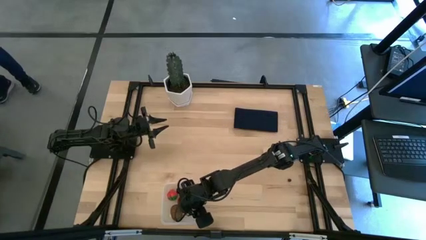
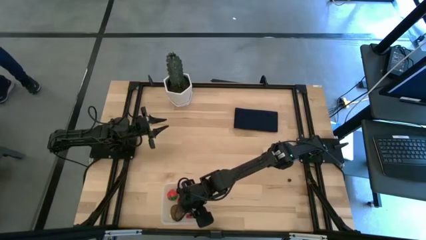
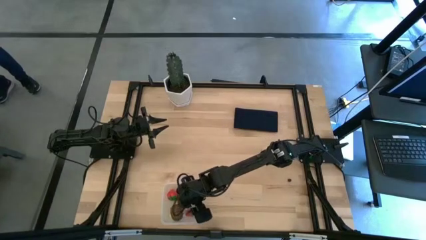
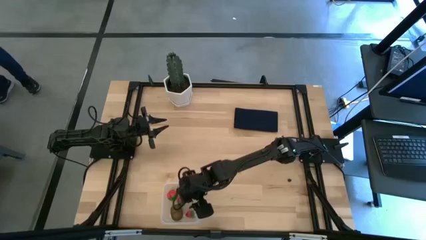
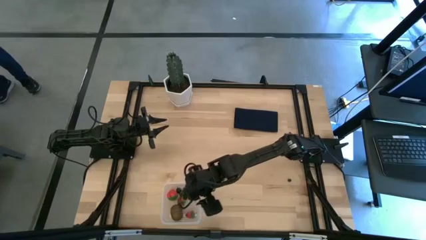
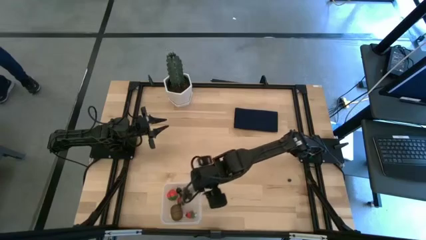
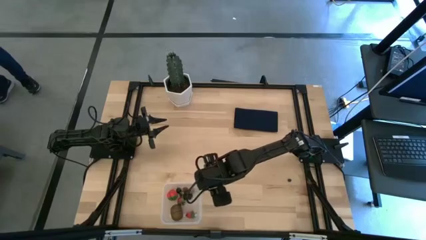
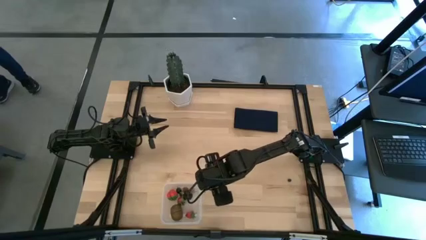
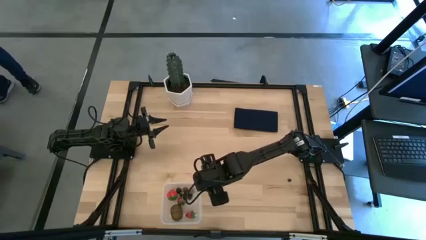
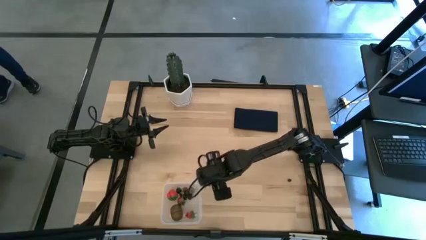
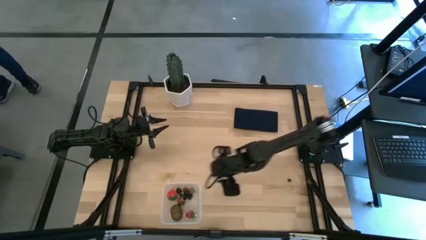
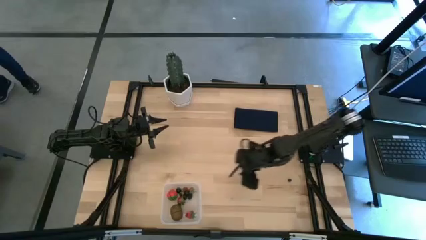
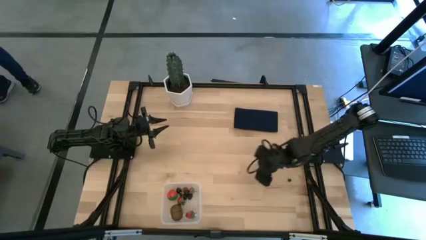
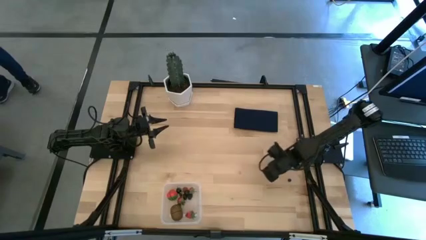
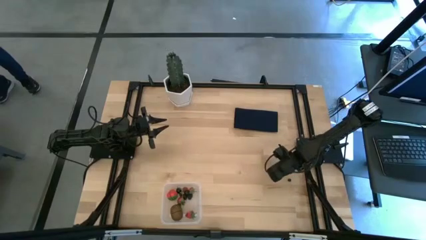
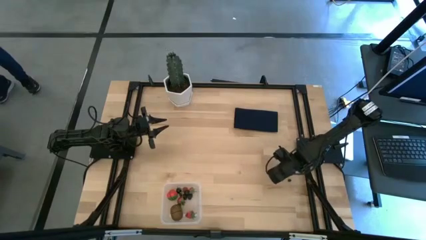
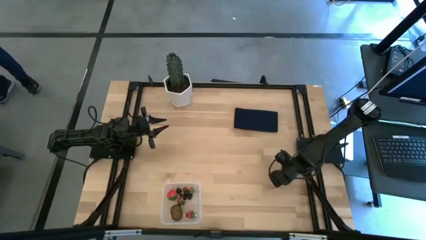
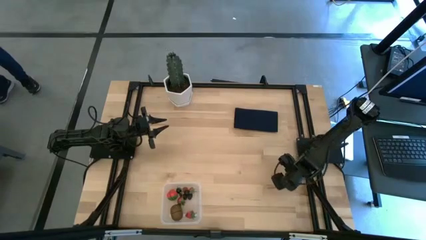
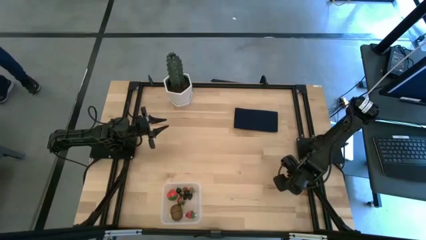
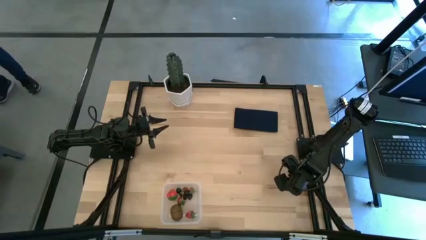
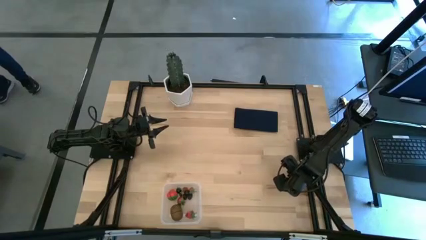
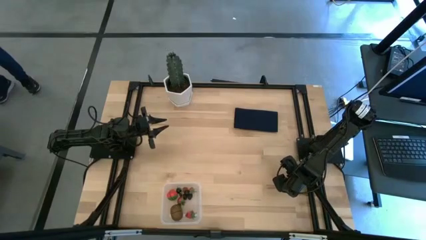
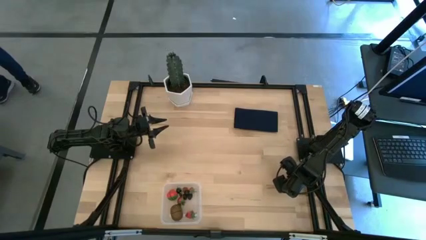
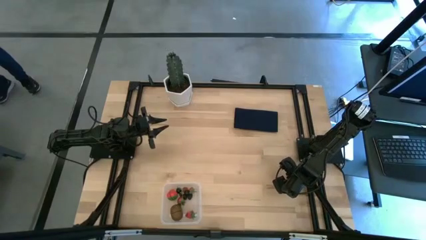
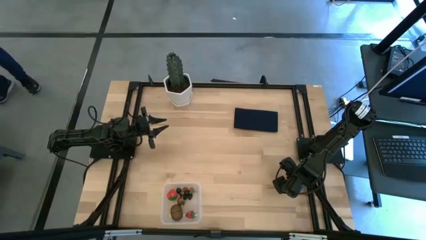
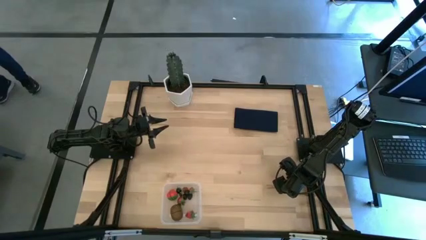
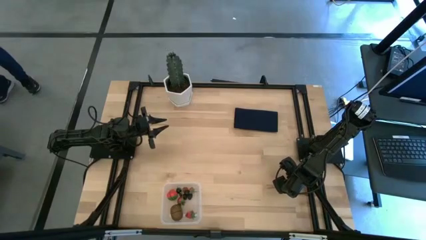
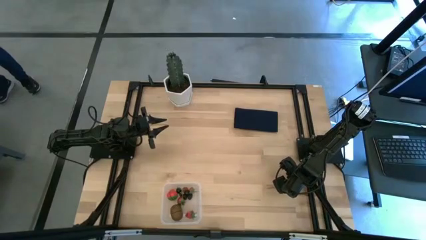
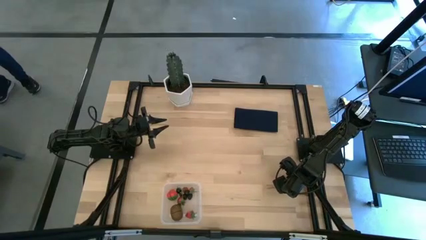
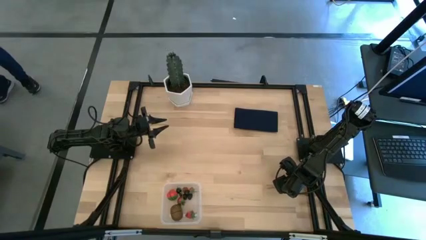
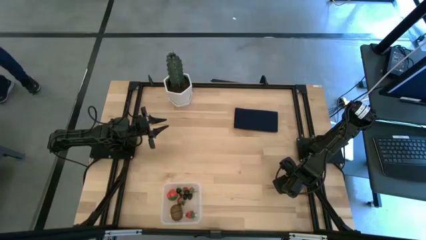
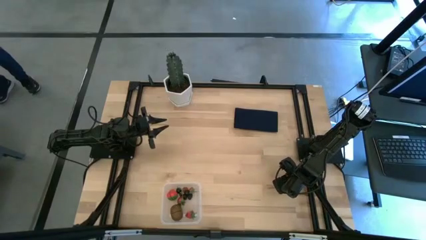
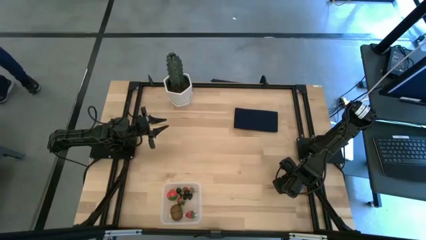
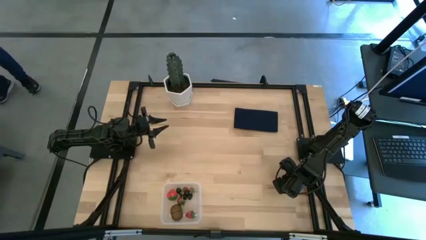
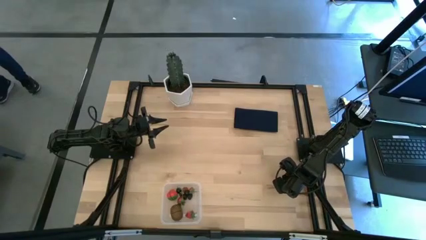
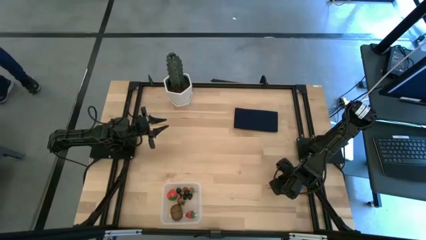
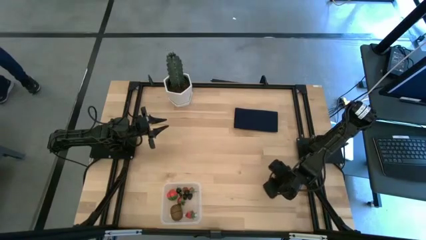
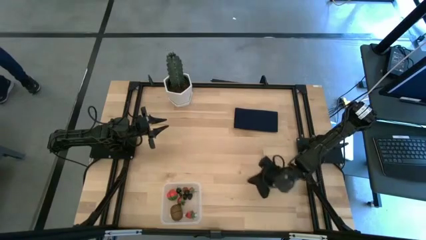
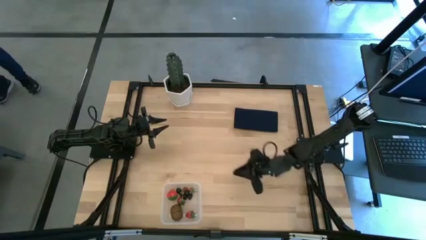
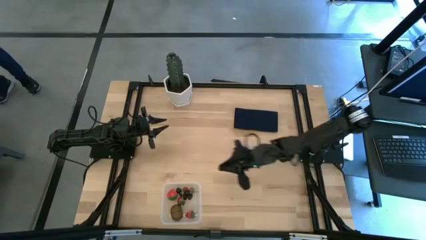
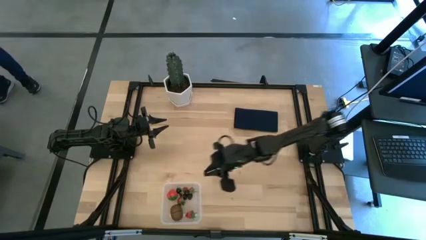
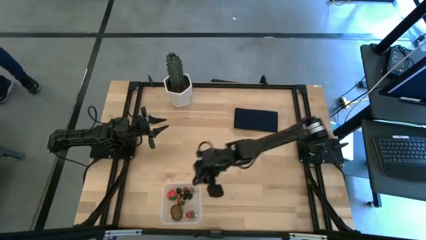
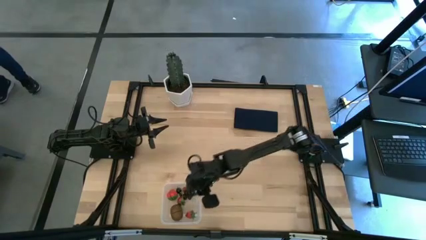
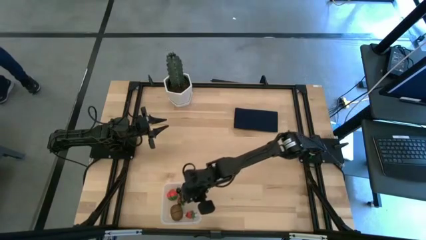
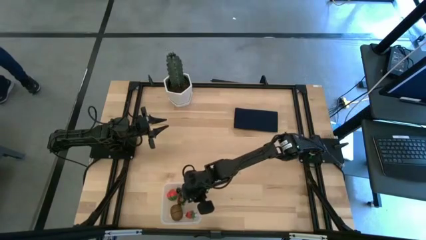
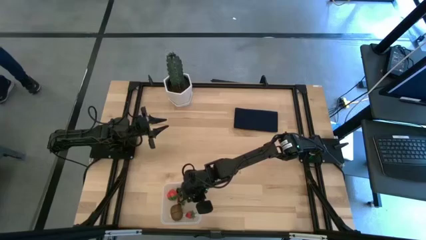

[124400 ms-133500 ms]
Task: Pick and placing Produce into tupperware
Put the blueberry in the transparent bin

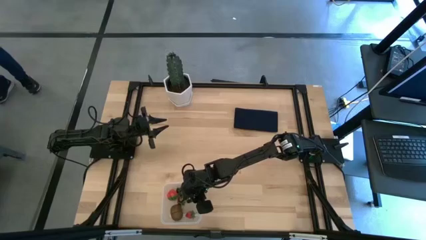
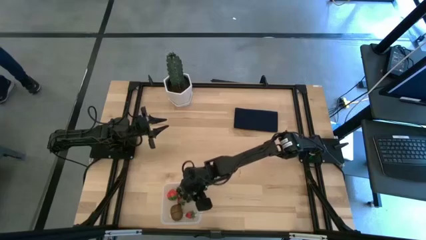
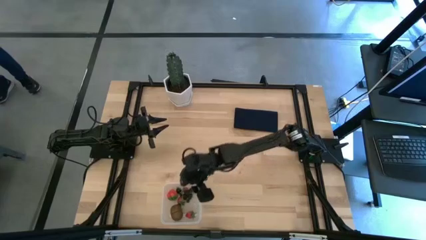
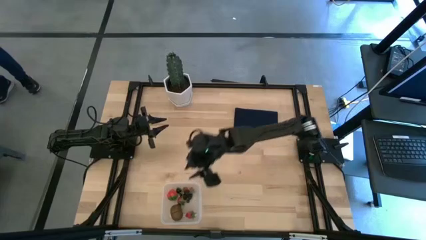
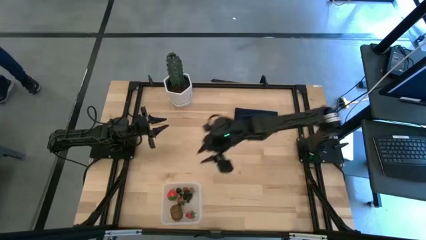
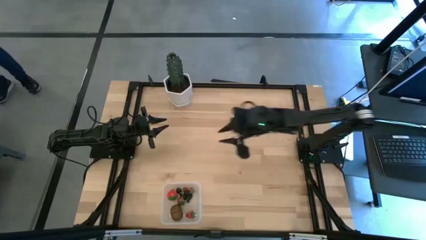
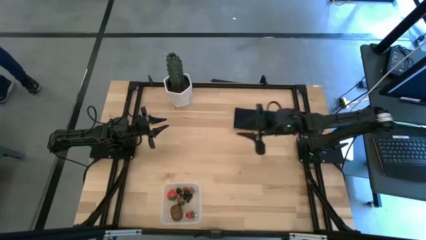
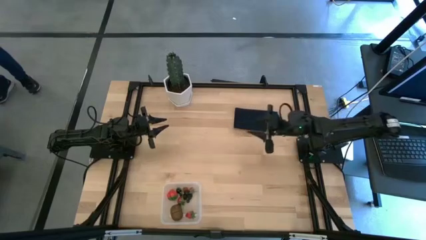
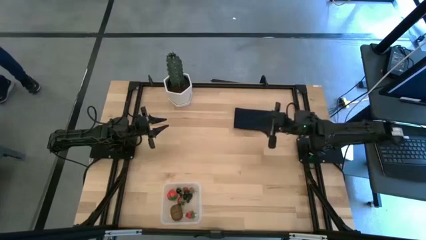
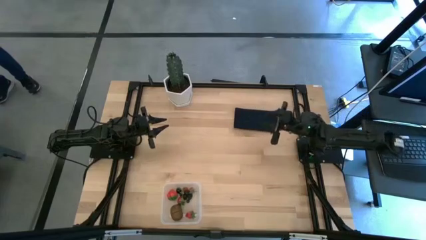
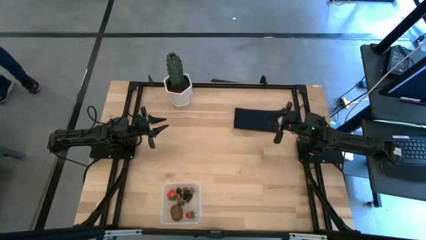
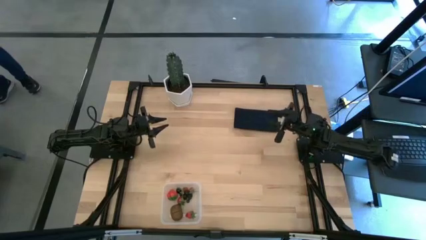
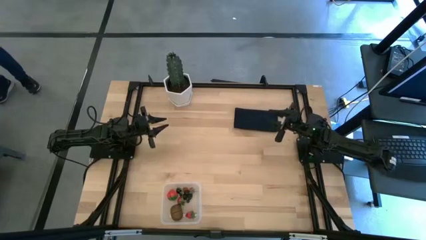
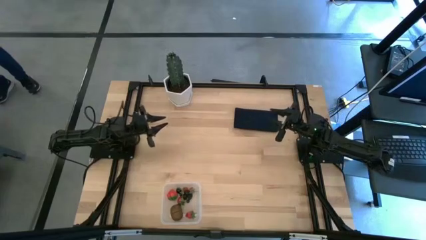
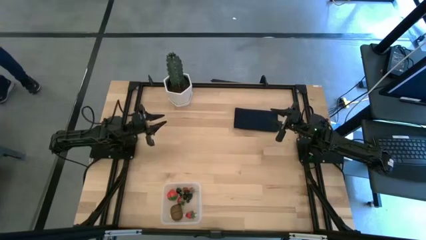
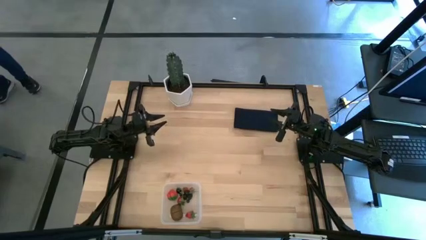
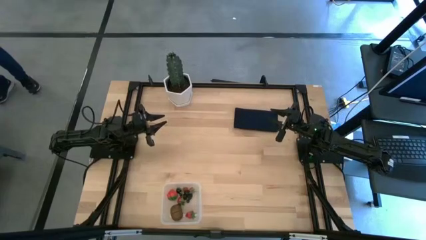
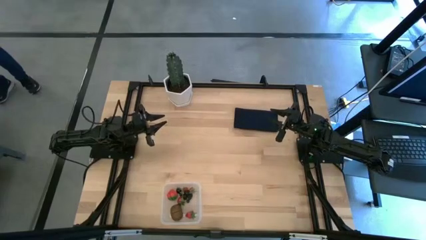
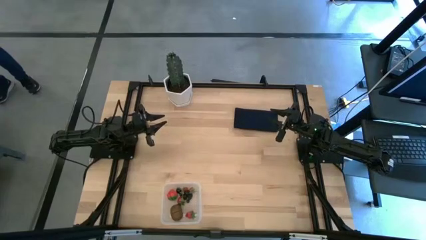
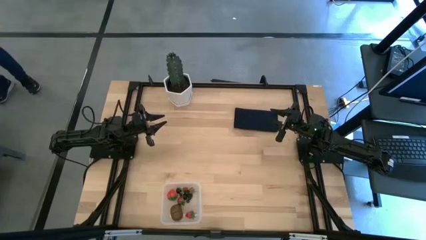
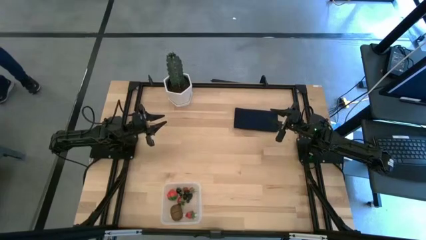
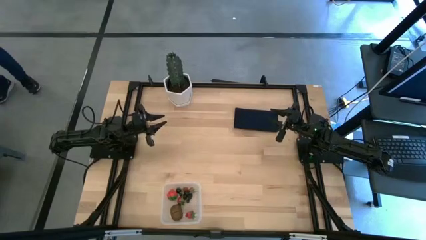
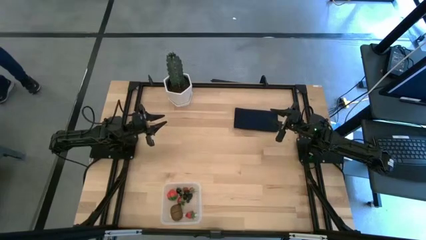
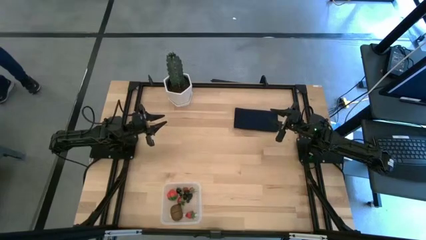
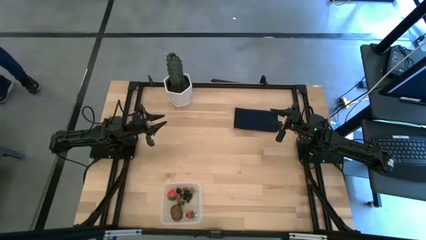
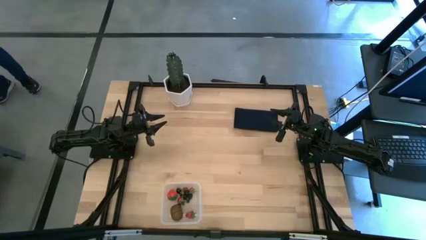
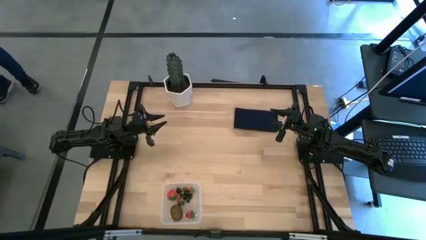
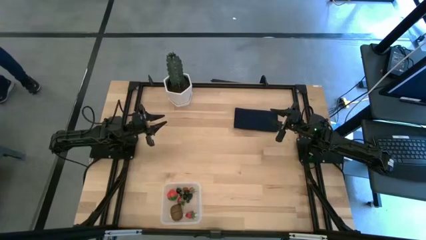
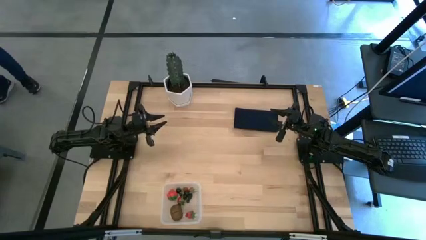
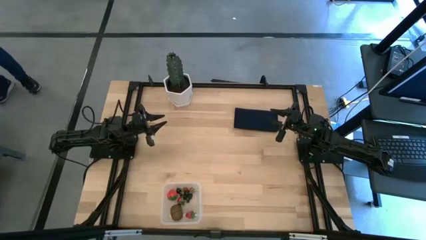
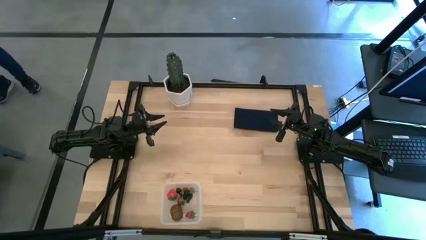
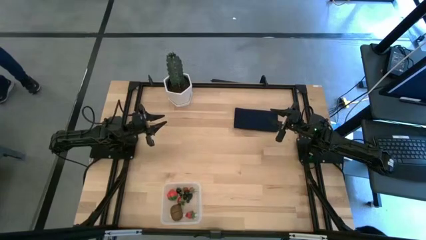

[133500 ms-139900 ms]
Return to Home Position

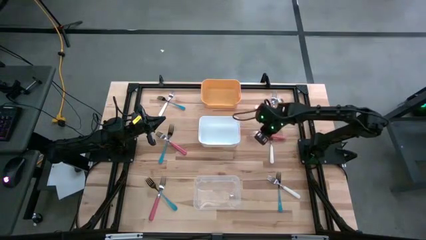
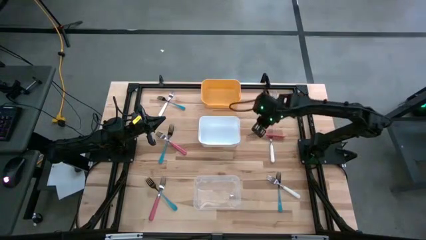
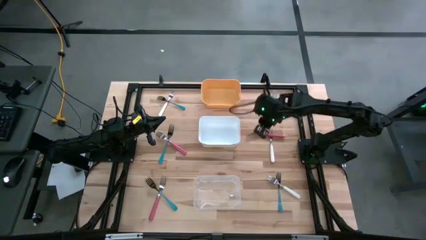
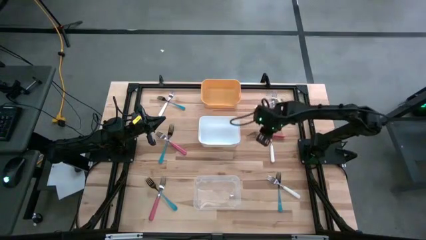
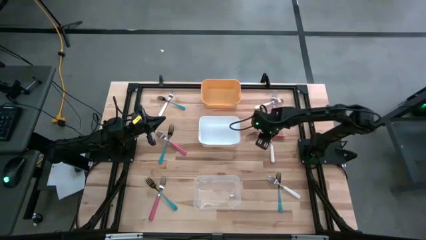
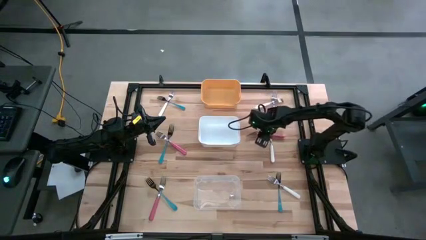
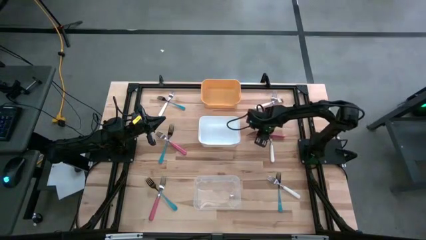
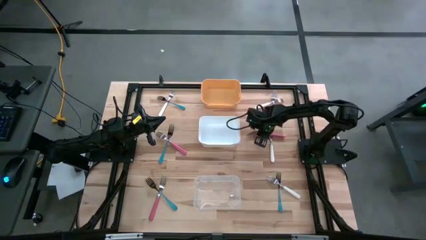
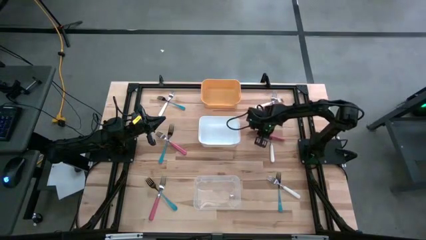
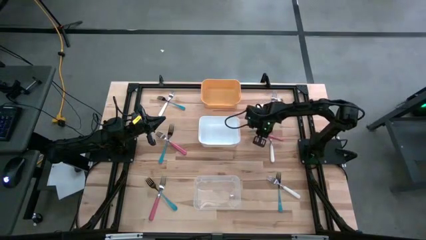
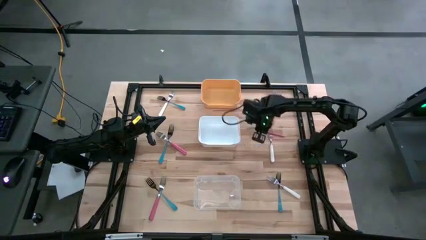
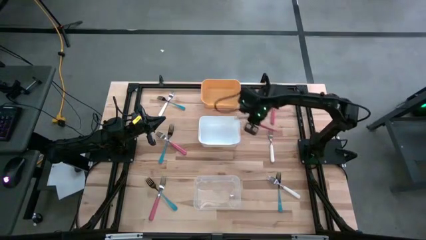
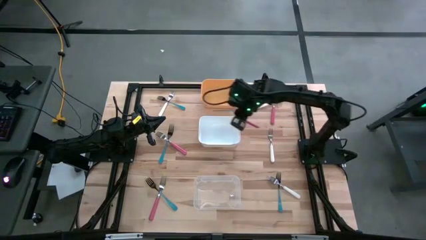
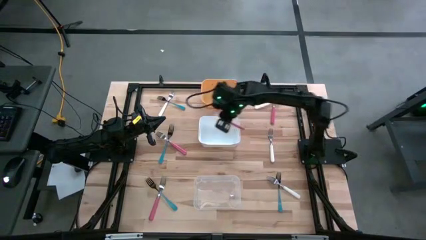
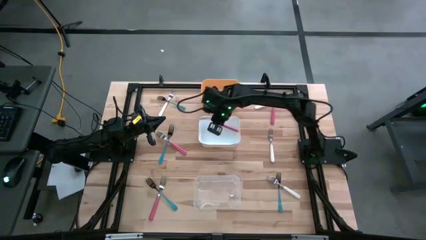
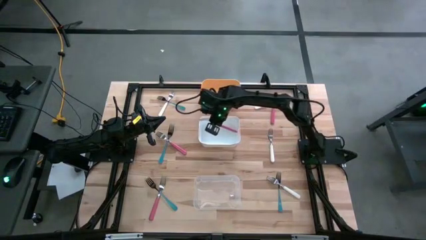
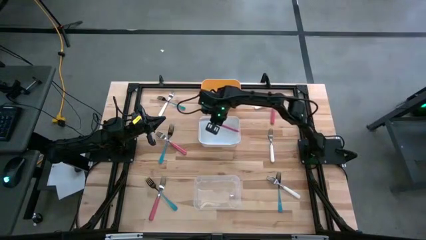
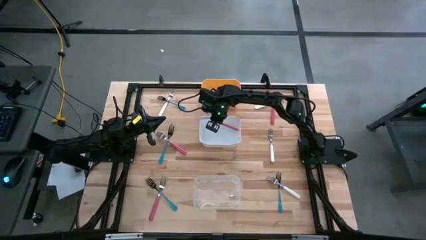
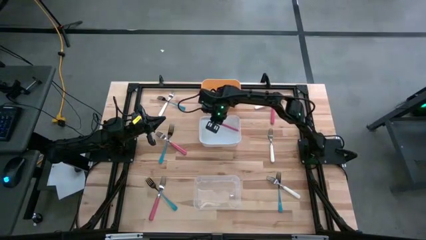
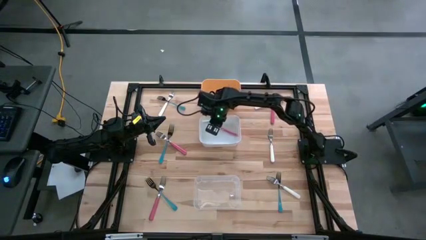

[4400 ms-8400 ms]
Task: Sort silverware by color (type)
Put the middle right pink fork into the white bin
